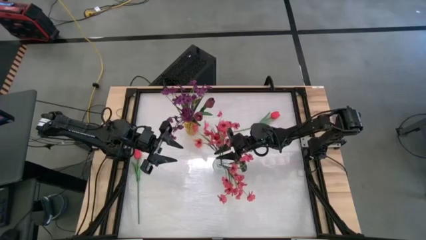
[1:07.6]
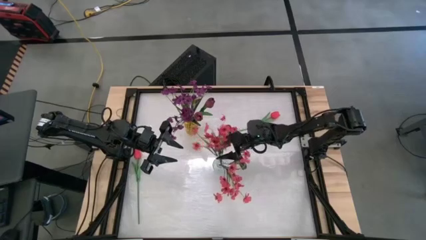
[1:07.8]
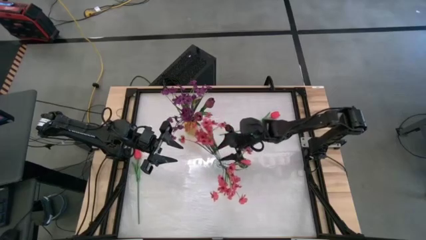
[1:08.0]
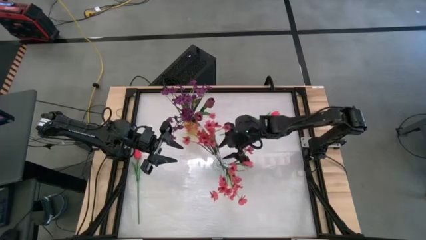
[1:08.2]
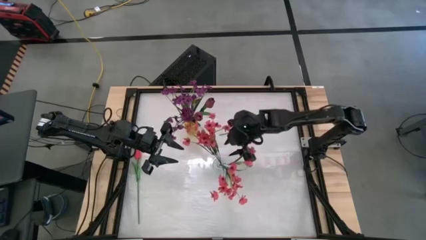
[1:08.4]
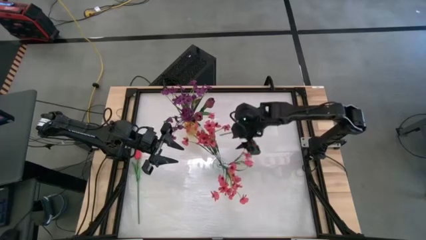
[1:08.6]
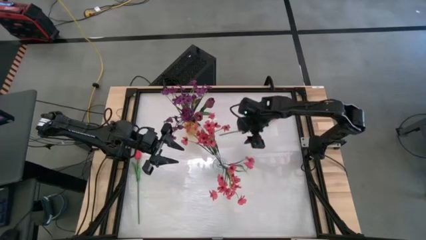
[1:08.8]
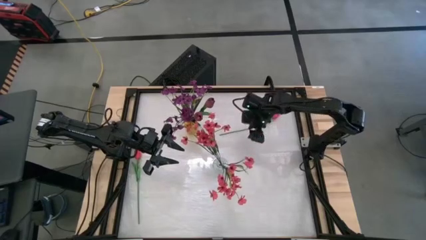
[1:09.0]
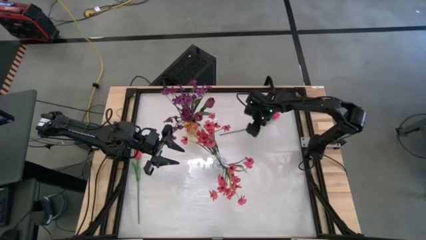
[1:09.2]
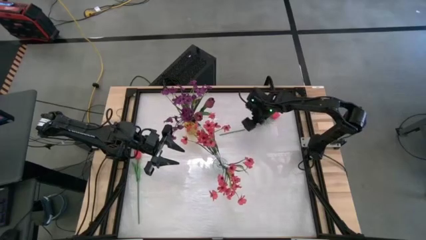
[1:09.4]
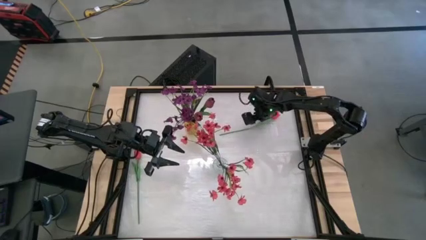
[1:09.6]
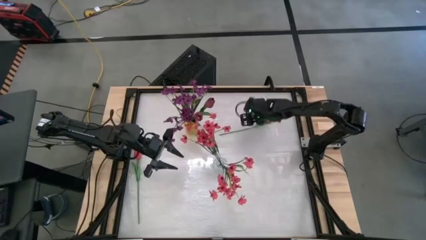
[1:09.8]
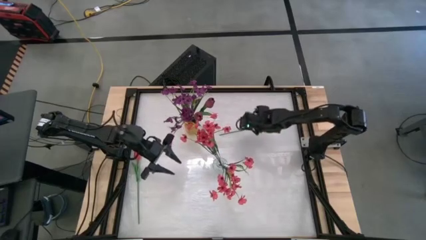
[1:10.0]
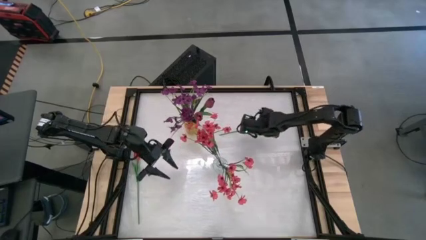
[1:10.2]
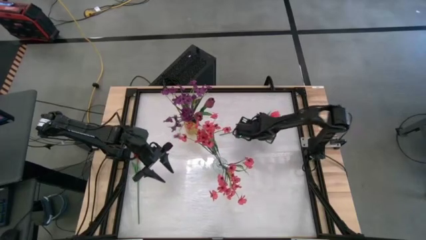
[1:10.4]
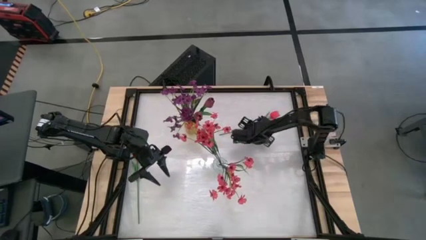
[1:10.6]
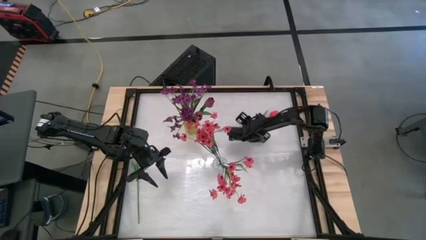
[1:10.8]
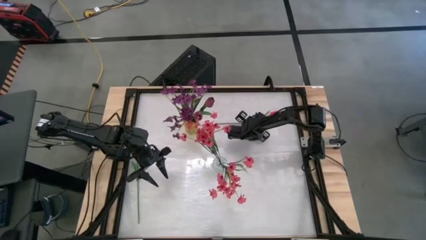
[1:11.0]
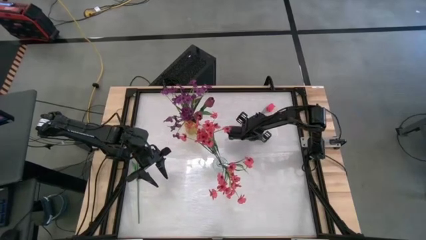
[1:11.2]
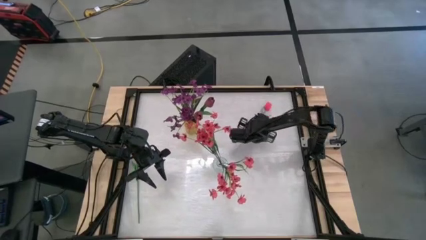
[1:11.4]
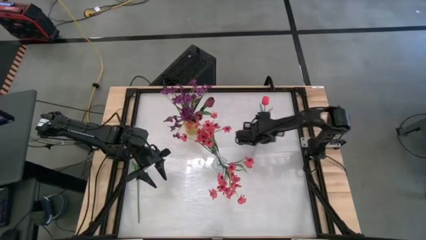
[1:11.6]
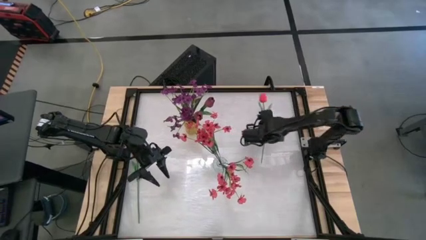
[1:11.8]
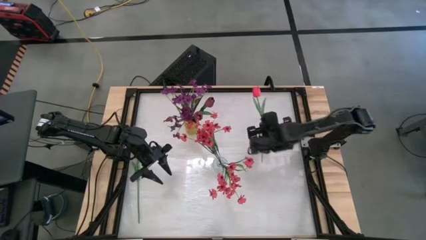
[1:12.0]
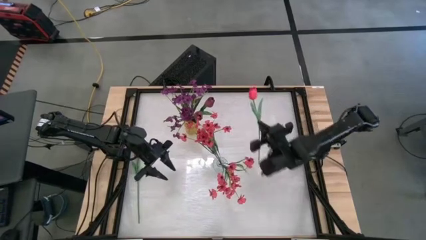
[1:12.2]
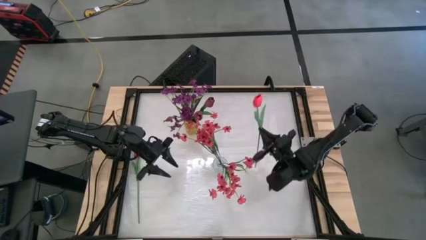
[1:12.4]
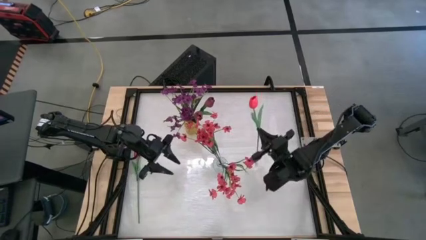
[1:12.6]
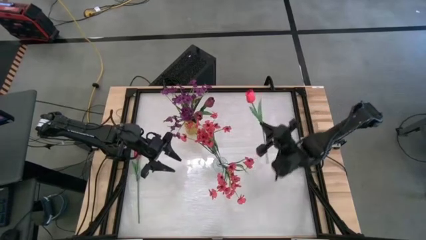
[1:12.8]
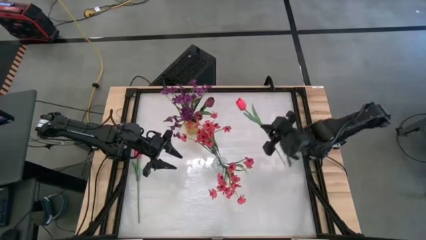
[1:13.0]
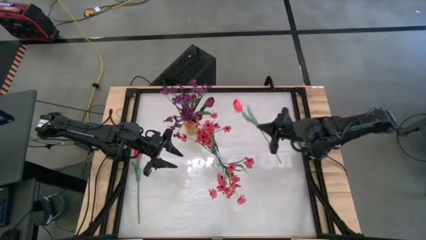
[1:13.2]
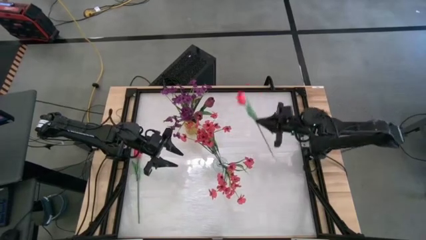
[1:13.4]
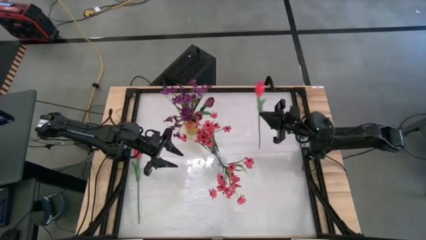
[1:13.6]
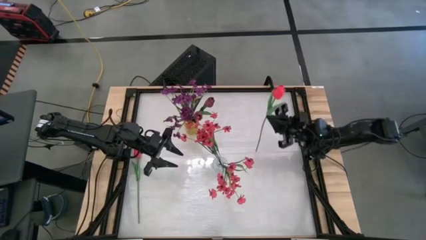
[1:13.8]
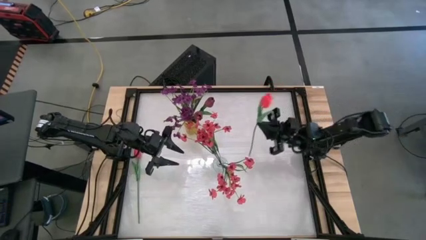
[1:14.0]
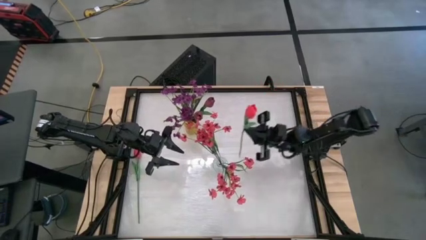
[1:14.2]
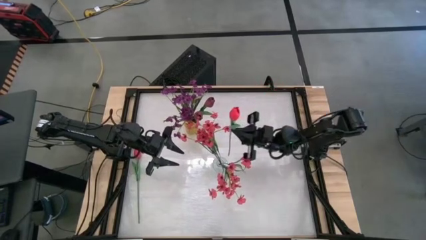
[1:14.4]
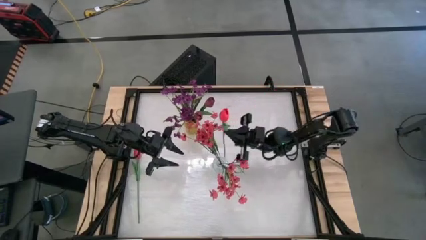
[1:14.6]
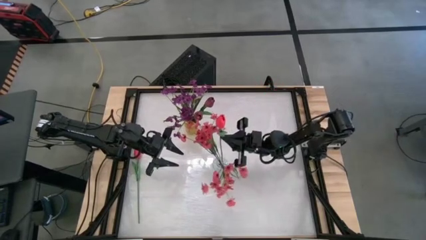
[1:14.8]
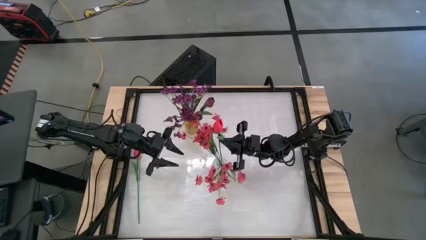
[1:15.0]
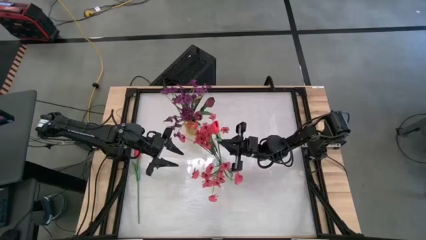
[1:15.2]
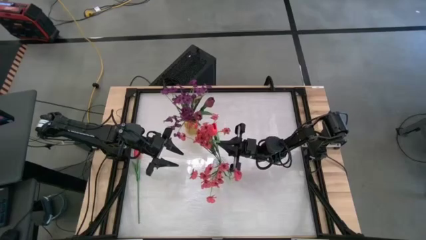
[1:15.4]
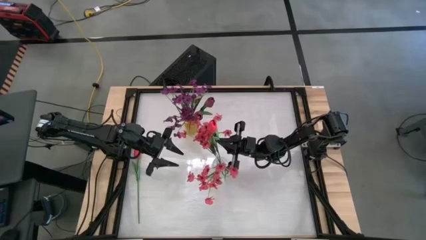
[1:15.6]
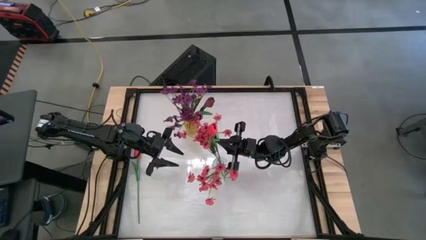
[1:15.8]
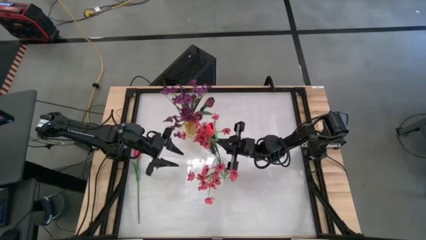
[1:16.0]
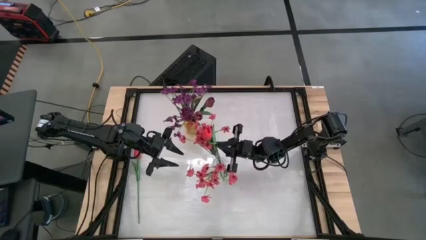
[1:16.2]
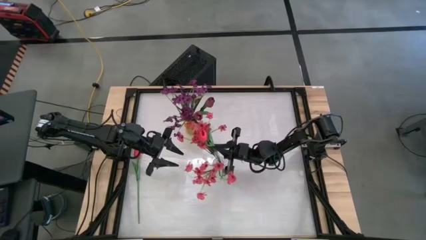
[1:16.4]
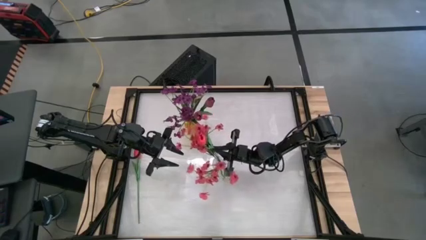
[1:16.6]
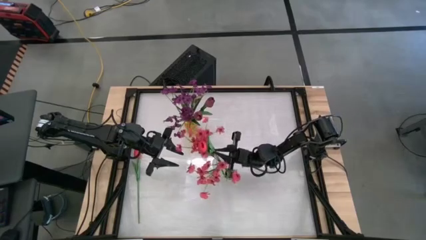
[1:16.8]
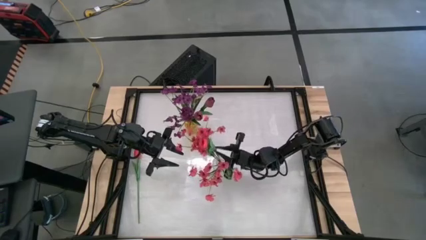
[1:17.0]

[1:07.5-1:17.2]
Task: Sort flowers into vase by color
Put the top pink flower into the transparent vase

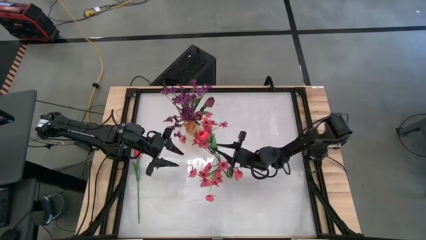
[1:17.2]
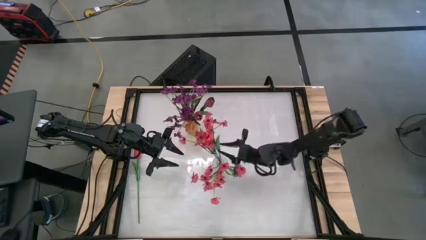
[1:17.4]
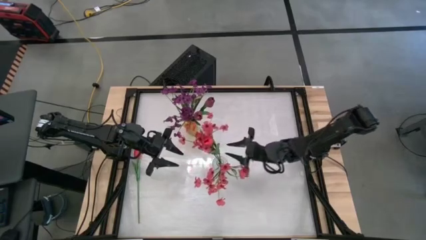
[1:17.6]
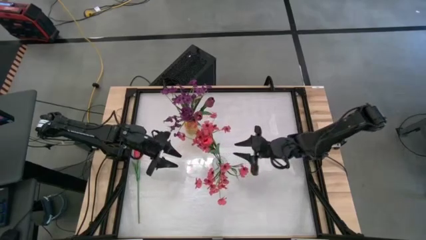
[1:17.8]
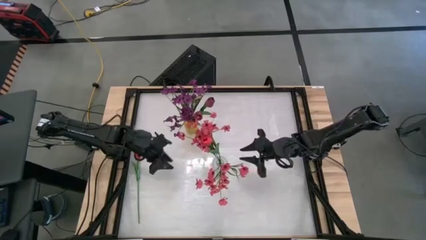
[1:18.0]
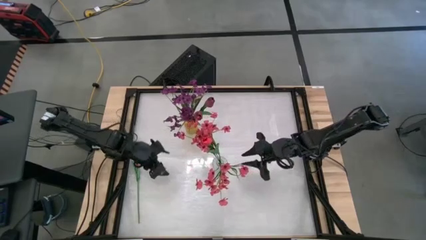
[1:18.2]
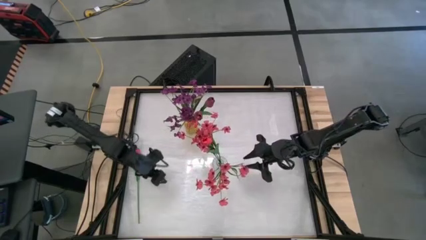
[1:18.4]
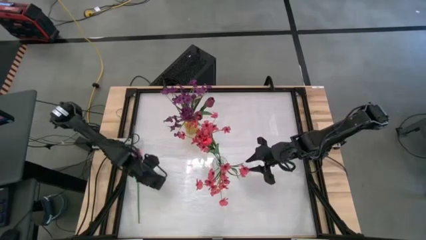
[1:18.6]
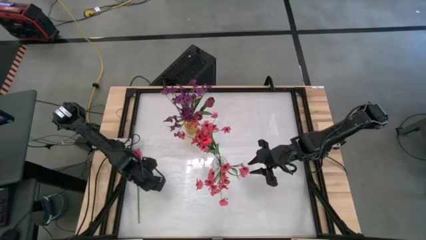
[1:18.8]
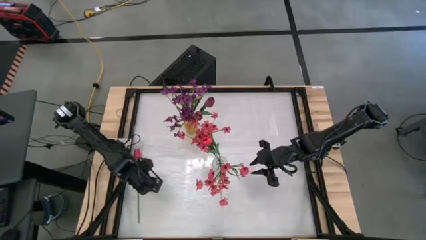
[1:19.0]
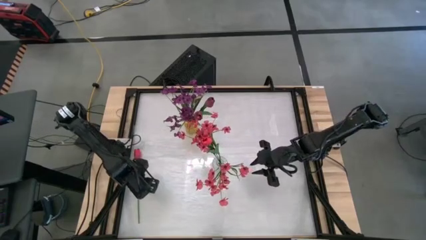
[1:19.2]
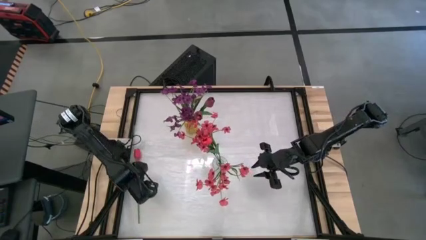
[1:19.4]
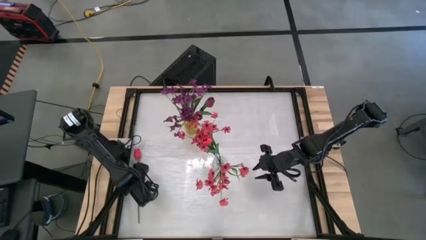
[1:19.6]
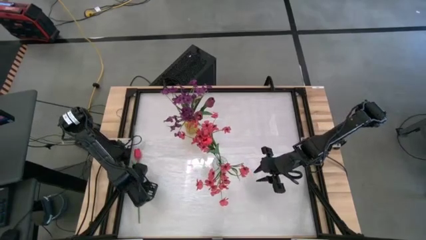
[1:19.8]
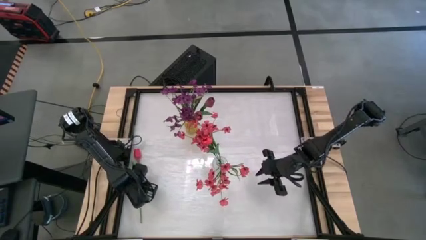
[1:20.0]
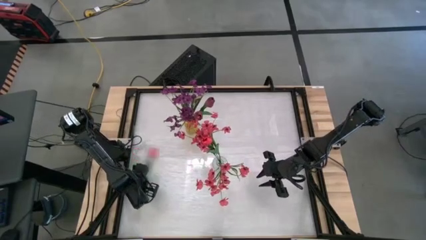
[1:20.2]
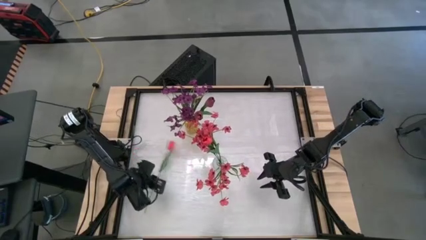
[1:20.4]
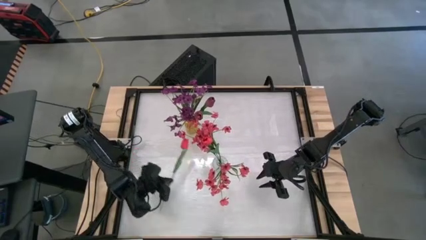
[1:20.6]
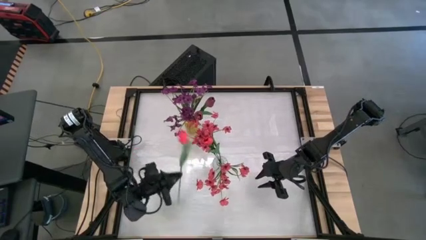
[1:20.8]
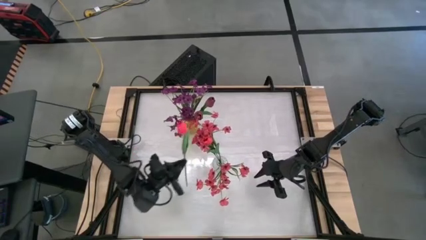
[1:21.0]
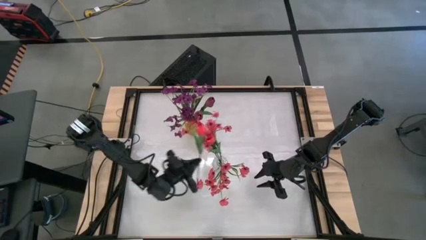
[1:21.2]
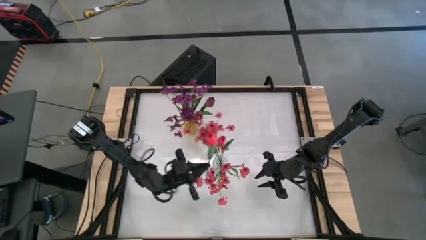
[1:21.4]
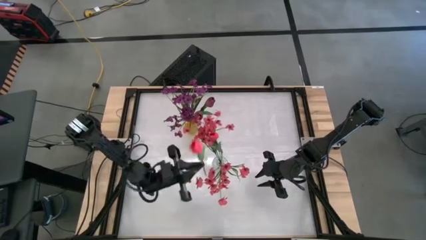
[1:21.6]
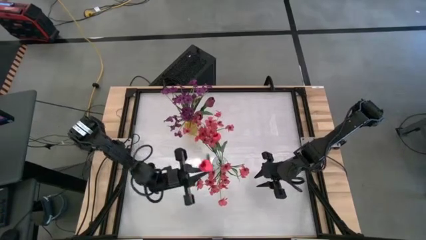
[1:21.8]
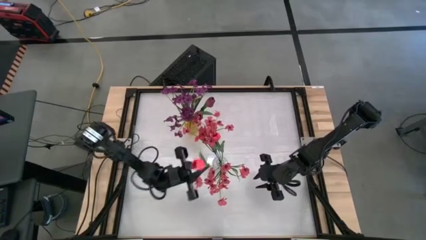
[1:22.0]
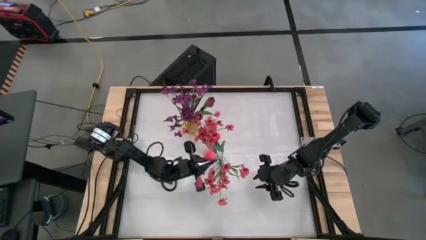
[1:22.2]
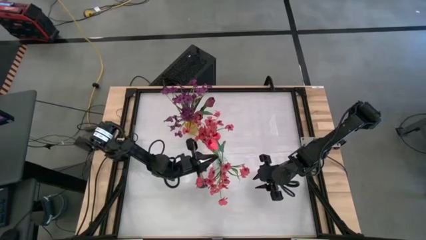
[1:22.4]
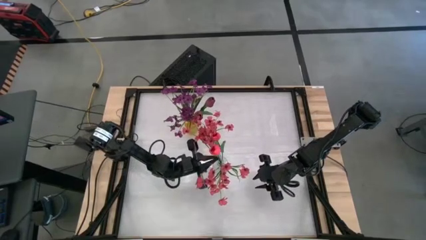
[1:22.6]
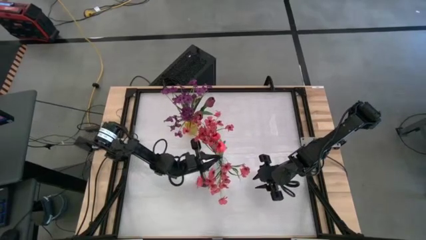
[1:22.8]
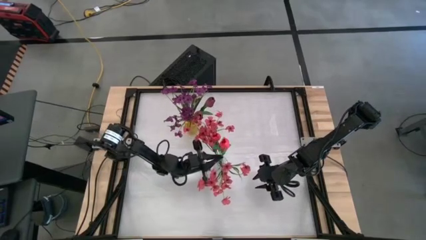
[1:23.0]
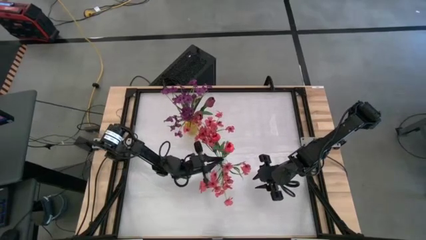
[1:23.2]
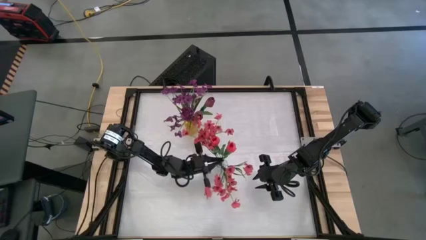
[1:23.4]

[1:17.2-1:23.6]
Put the pink flower into the transparent vase
